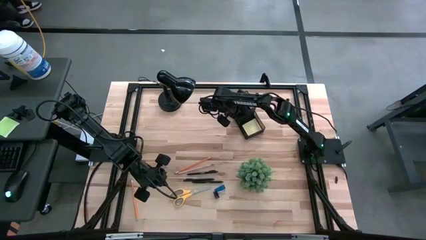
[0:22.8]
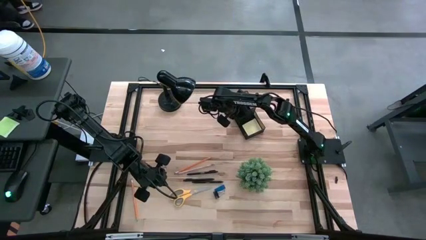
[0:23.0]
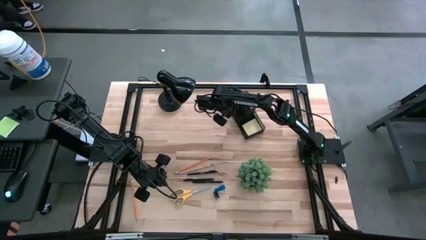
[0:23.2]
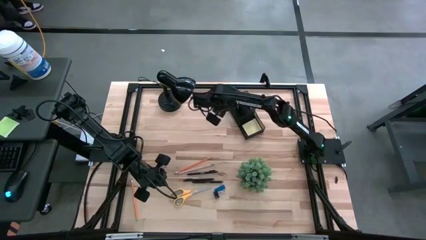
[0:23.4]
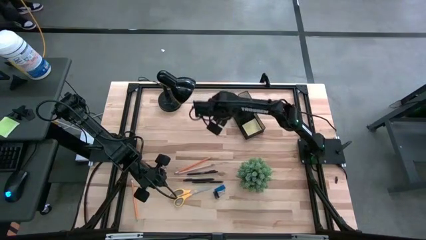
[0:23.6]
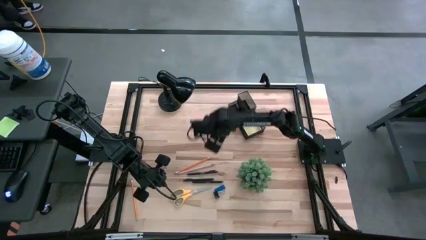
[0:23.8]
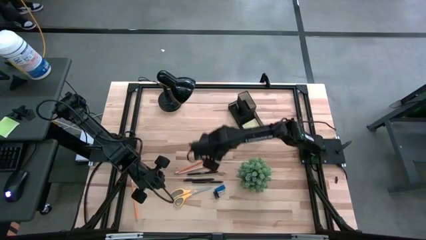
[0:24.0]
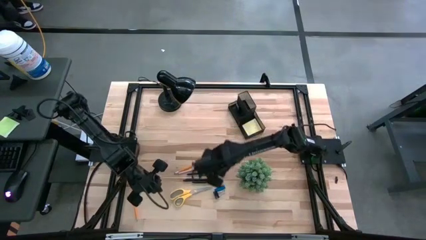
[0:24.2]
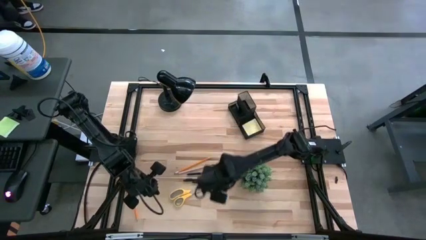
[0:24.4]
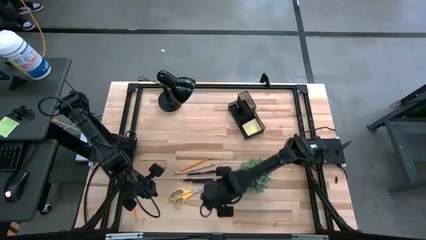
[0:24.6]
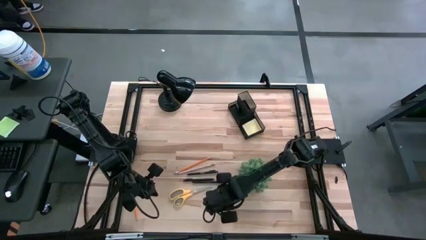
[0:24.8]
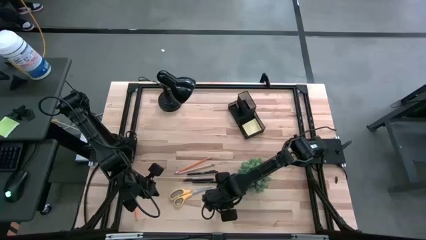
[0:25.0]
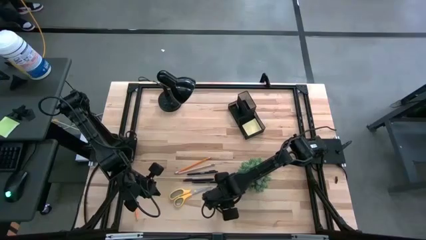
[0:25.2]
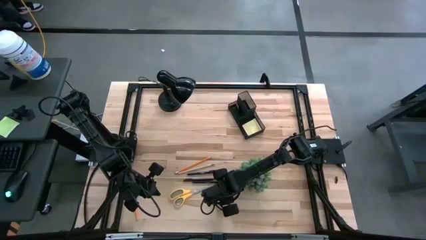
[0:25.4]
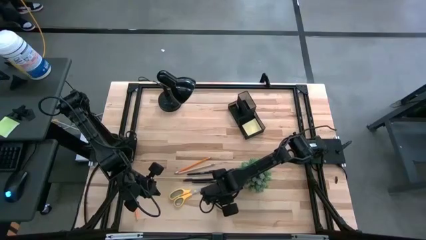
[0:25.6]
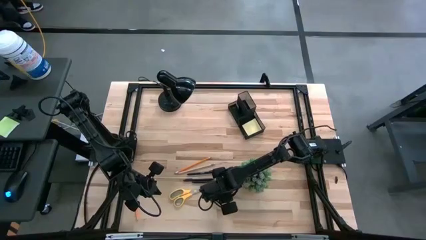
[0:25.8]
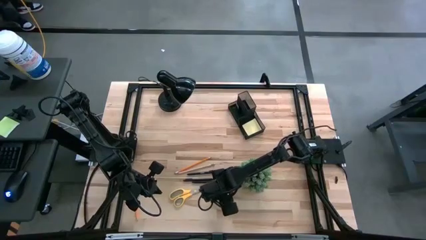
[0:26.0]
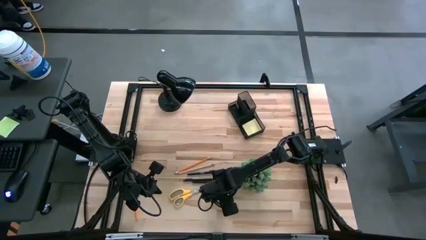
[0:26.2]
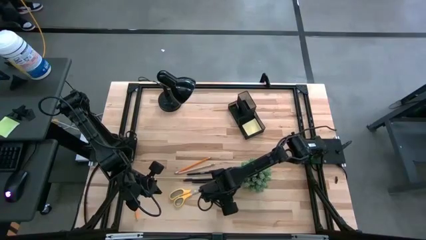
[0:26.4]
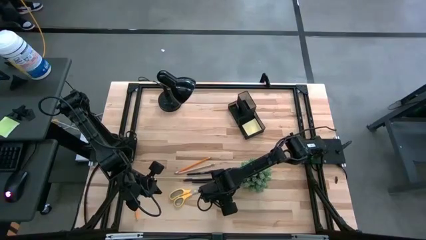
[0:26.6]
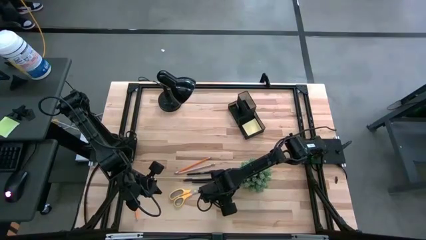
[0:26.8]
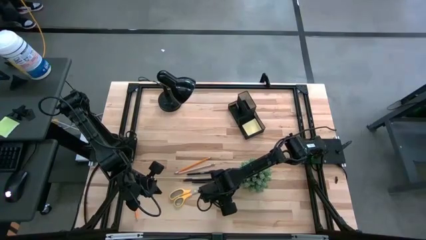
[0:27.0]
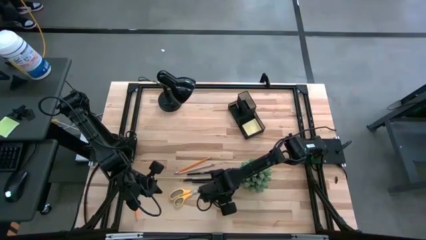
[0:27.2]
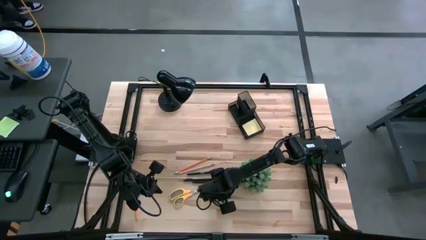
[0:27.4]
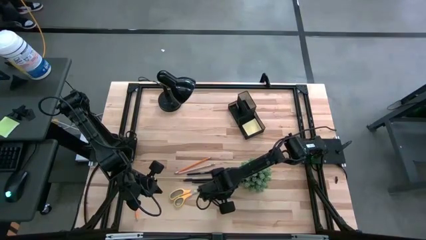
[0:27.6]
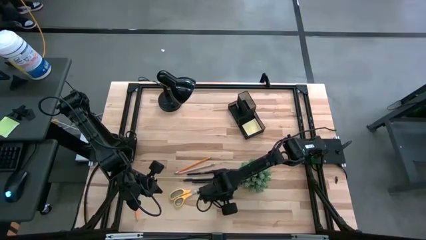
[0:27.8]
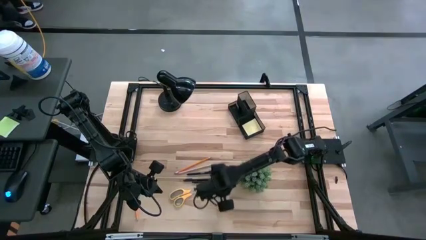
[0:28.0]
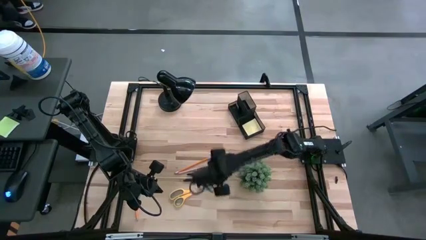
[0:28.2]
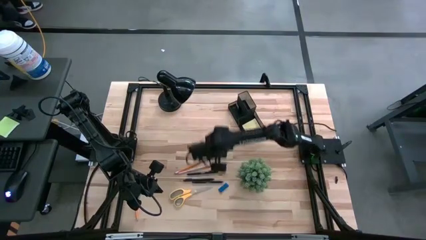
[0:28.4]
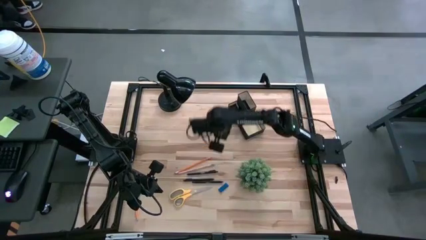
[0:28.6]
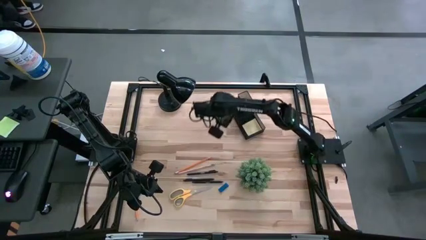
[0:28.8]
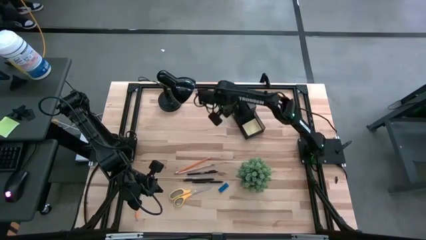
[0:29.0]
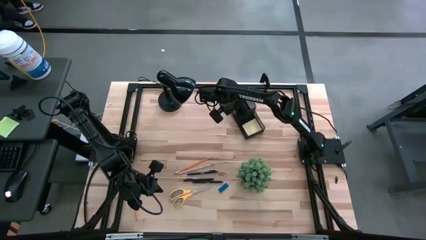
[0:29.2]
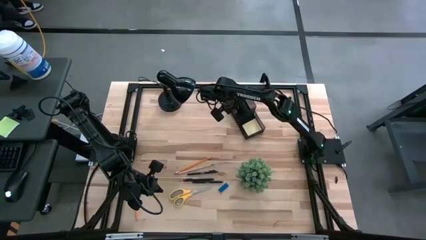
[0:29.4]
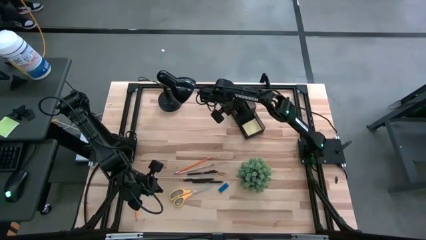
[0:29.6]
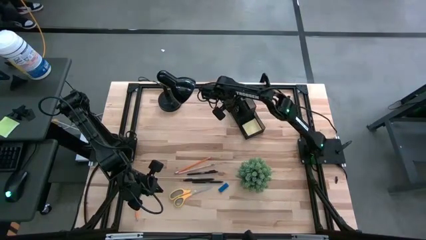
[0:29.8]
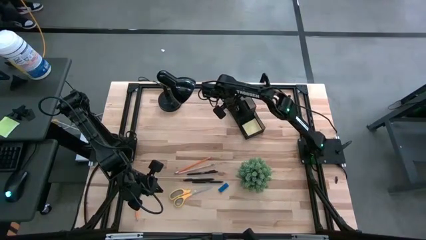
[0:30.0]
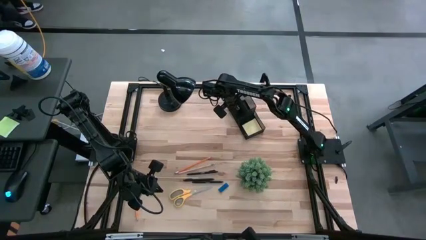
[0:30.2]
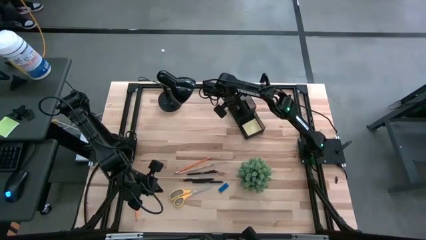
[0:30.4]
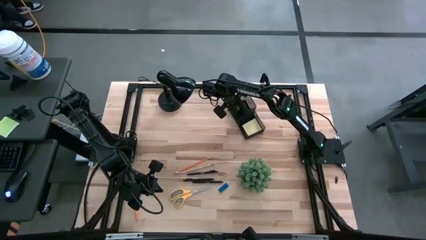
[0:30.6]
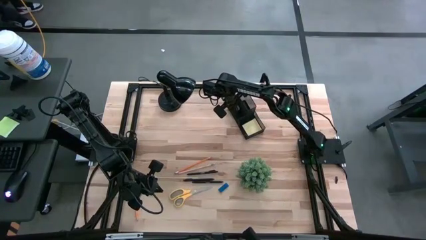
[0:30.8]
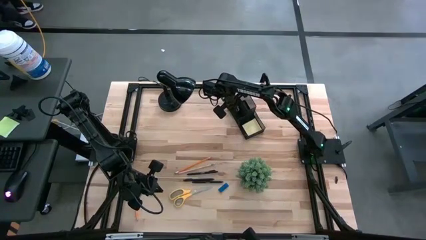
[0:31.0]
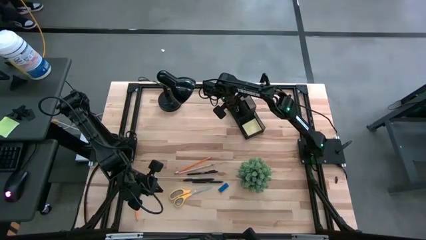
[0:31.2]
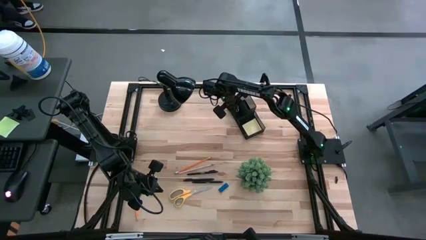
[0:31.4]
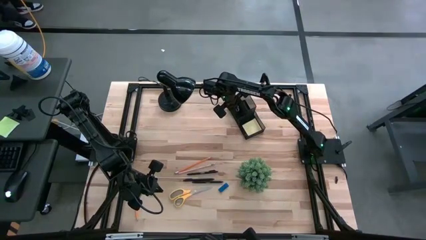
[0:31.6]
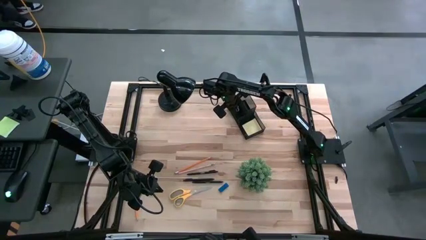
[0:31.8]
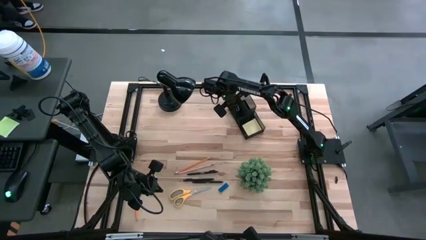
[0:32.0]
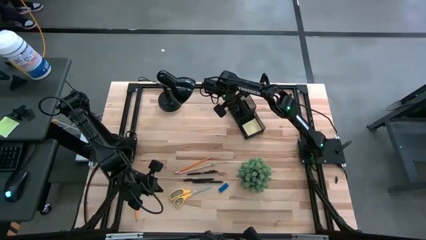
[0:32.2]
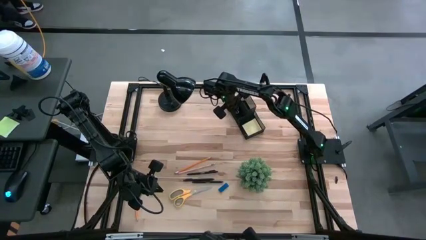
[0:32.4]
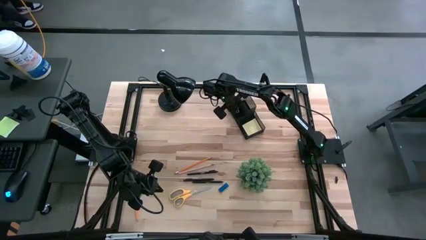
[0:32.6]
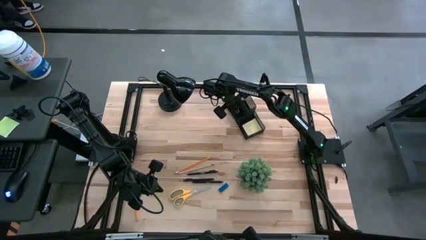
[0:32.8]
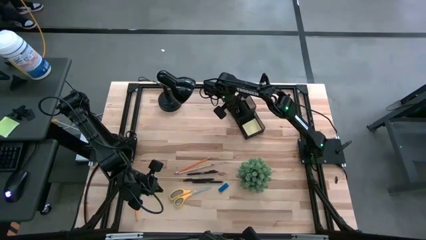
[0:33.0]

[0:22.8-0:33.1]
Task: Pick and place office supplies into organizer
Put the binder clip into the desk organizer

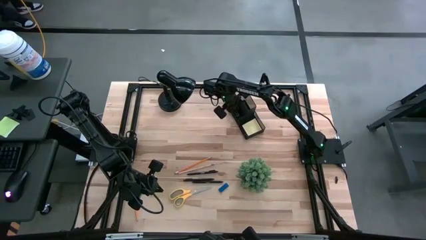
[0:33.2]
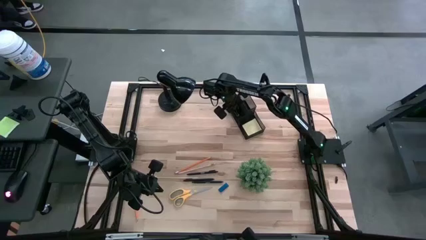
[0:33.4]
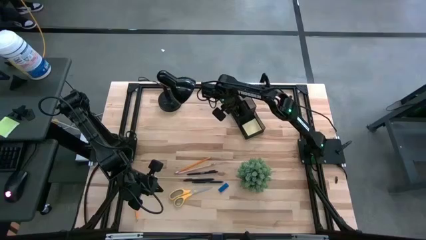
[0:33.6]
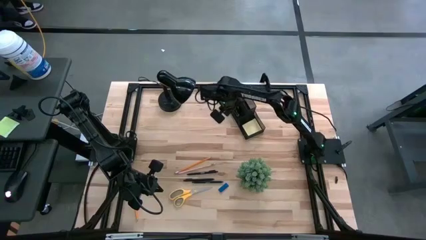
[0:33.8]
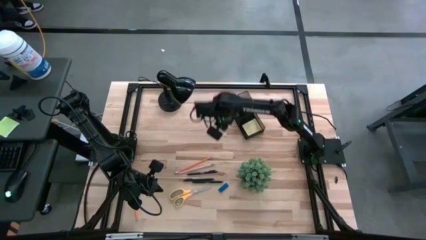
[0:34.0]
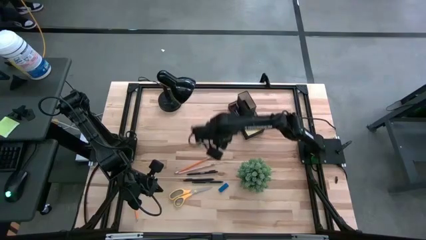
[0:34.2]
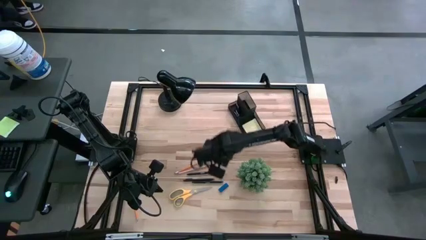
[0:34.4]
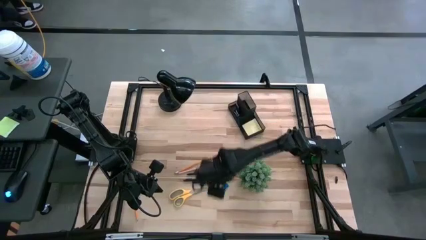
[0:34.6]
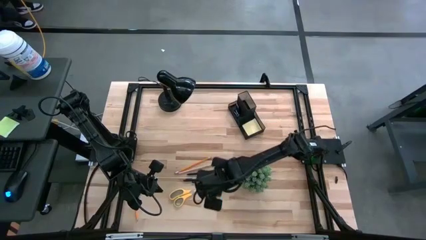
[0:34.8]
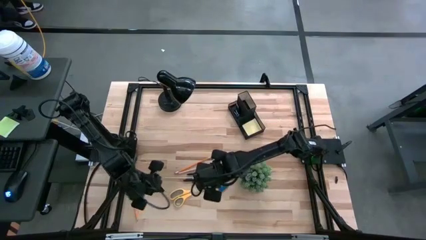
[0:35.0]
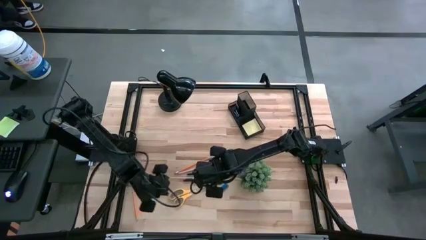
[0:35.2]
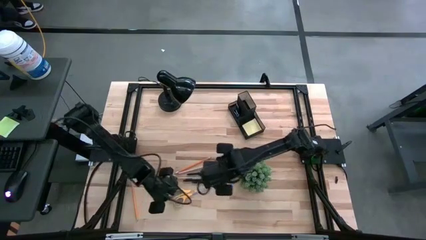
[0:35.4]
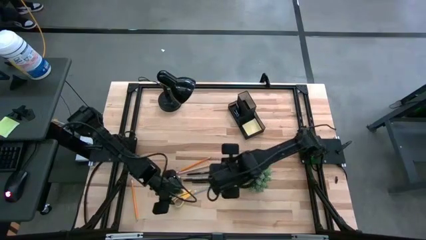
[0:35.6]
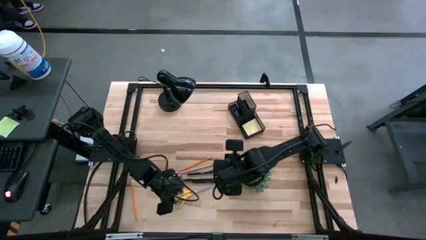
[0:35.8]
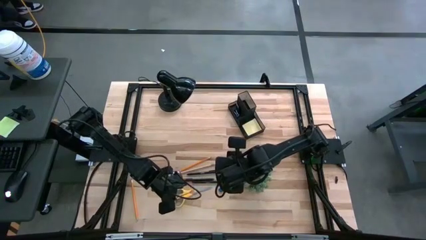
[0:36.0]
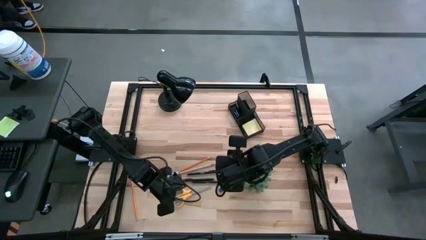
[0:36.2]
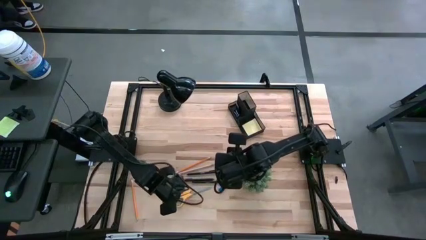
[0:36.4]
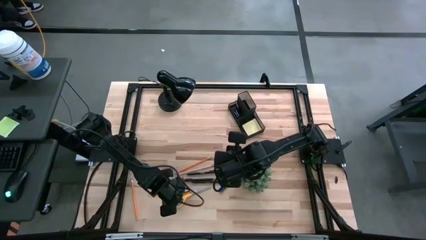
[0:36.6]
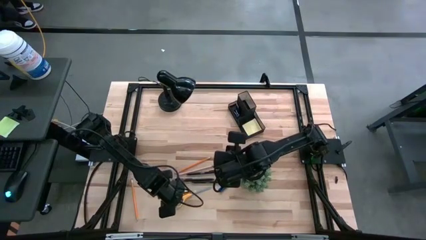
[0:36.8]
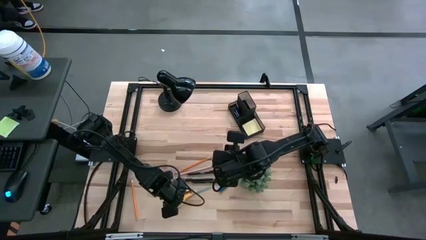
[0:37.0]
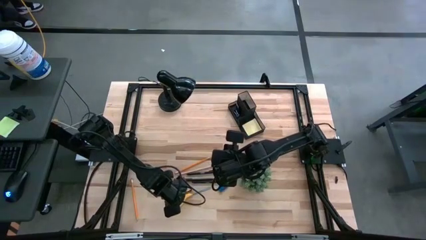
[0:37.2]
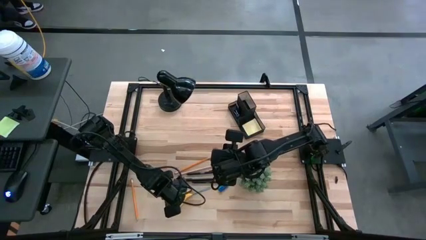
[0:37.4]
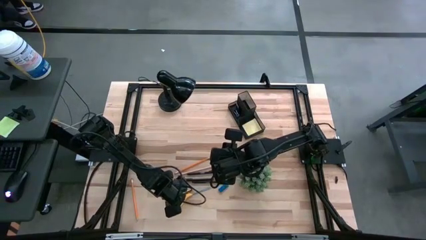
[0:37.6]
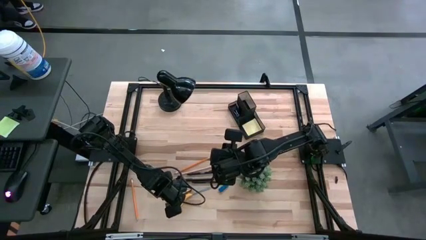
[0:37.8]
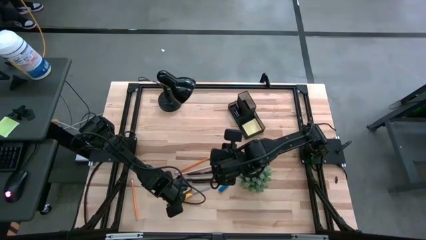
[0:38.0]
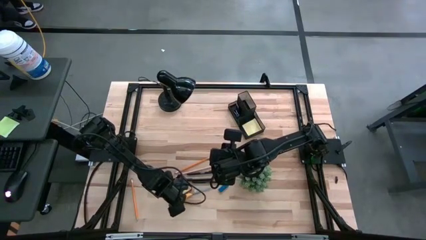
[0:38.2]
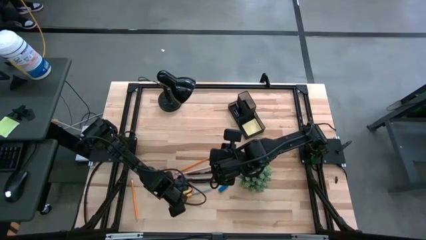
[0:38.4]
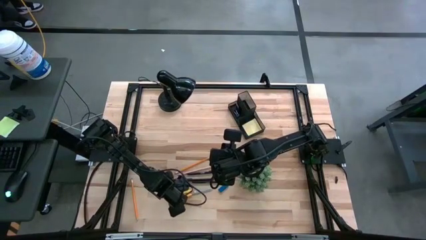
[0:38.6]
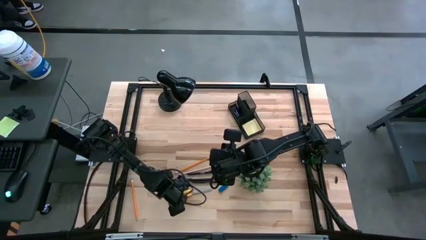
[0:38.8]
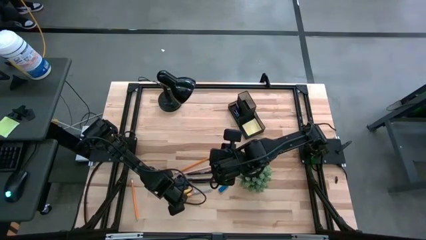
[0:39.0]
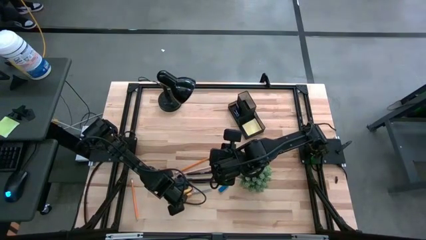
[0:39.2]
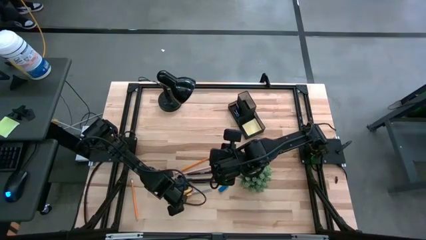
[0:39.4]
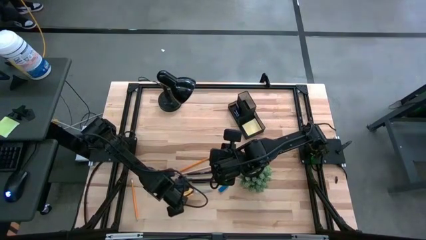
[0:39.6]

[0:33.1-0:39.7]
Put the yellow scissors into the desk organizer
